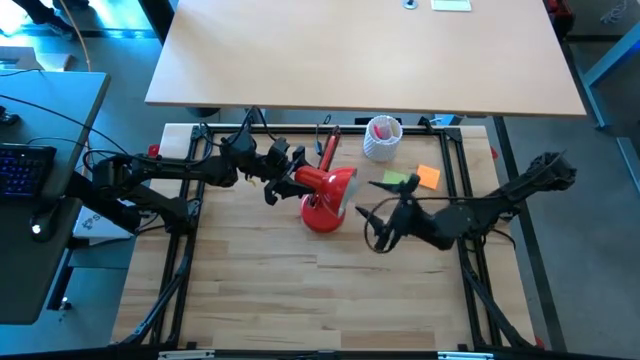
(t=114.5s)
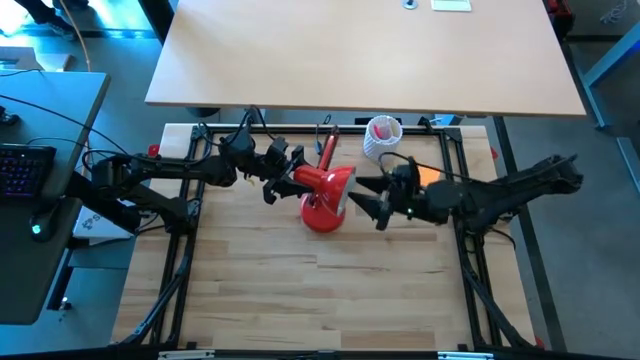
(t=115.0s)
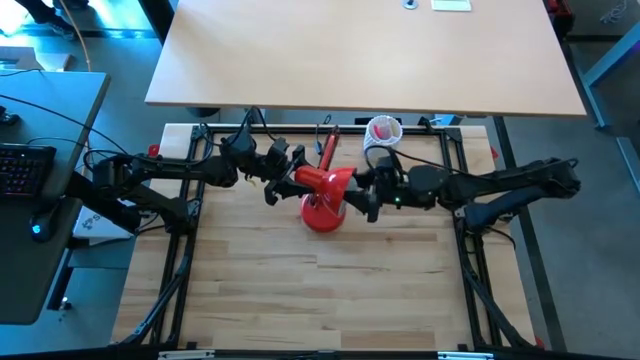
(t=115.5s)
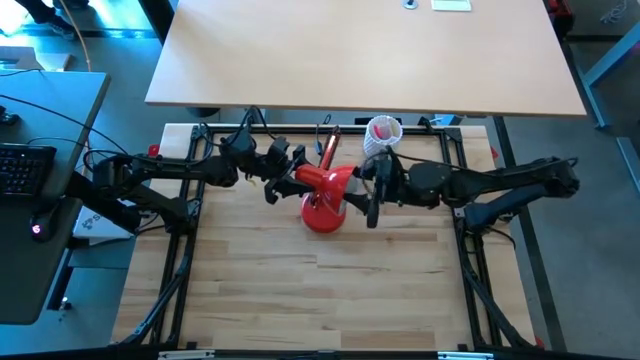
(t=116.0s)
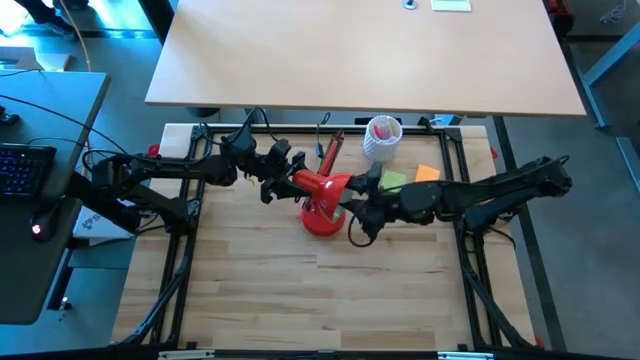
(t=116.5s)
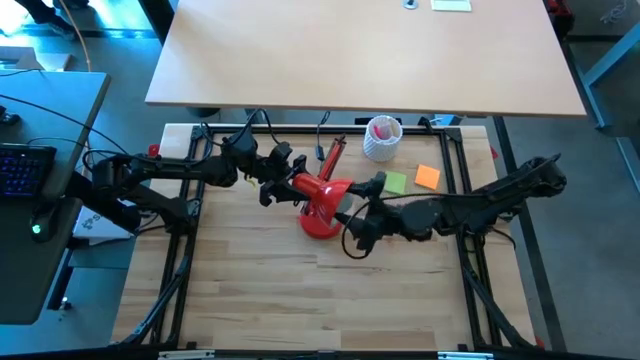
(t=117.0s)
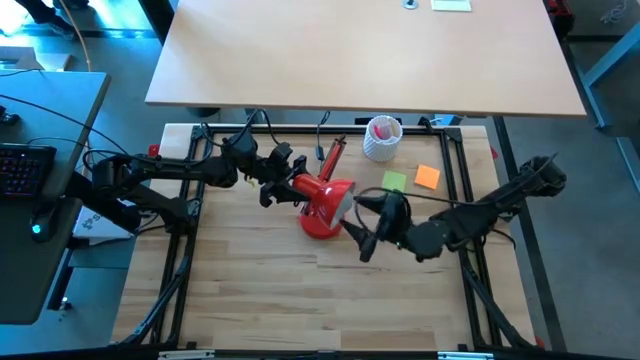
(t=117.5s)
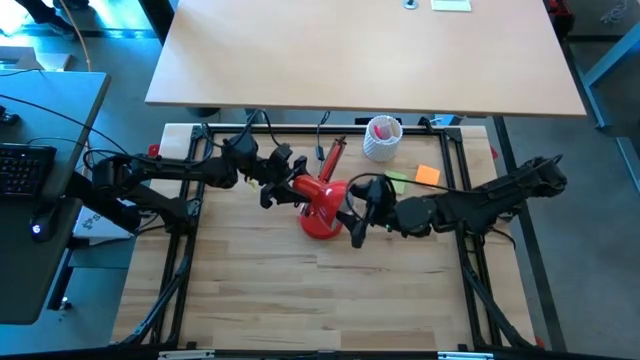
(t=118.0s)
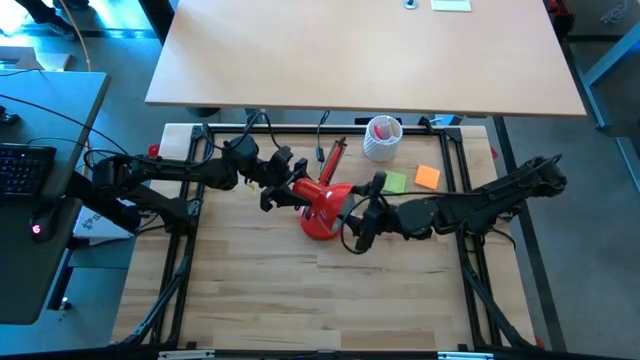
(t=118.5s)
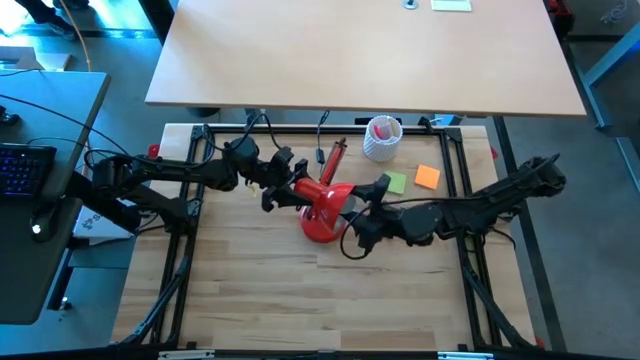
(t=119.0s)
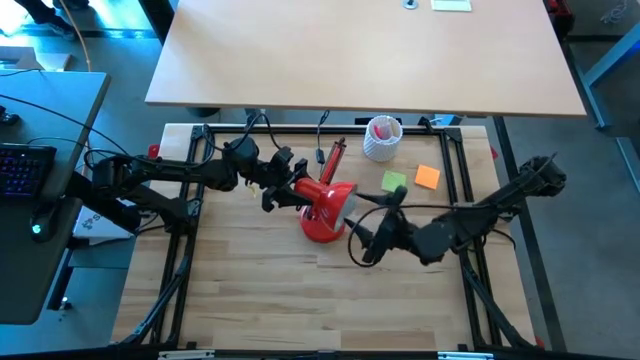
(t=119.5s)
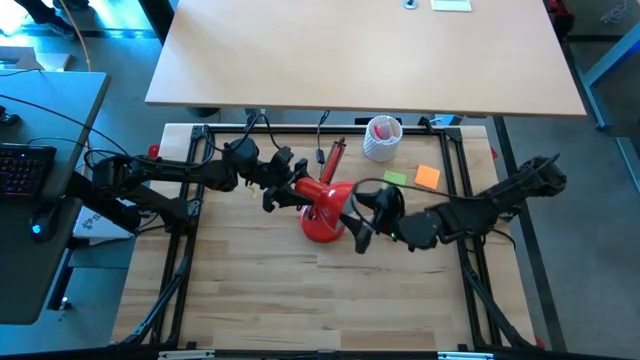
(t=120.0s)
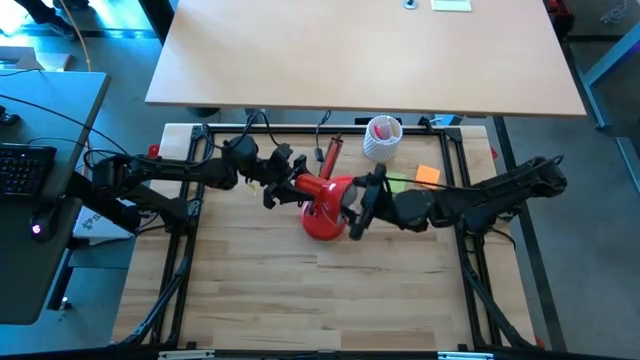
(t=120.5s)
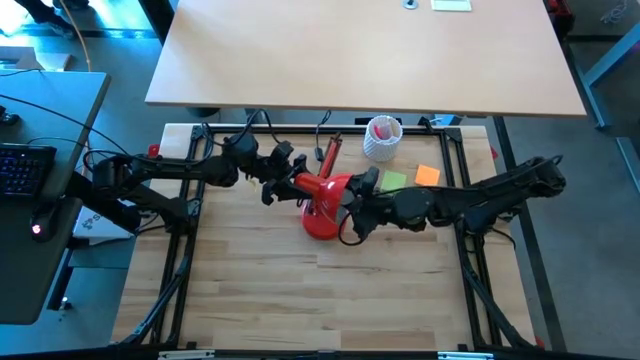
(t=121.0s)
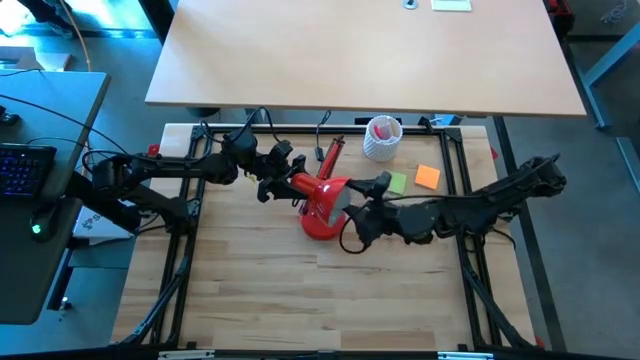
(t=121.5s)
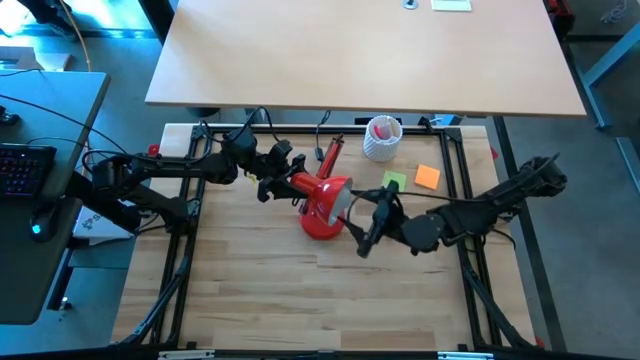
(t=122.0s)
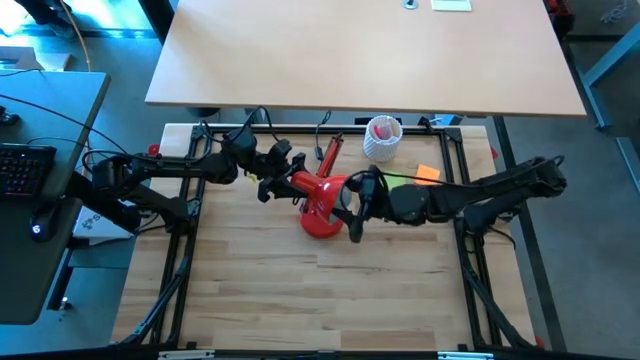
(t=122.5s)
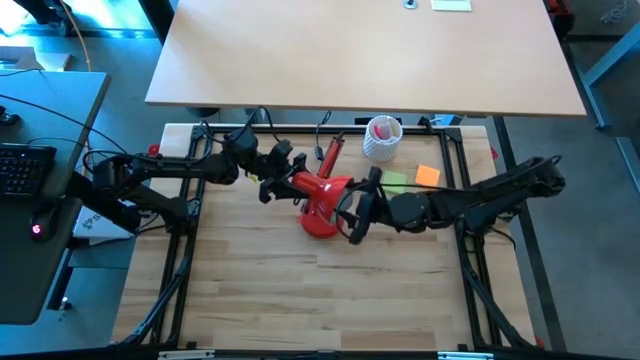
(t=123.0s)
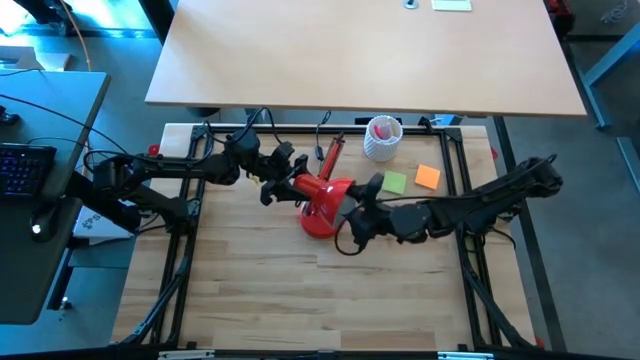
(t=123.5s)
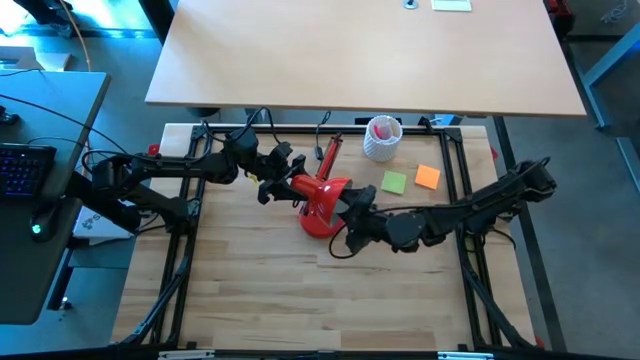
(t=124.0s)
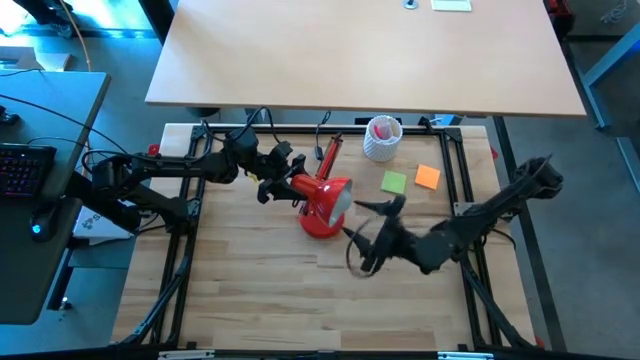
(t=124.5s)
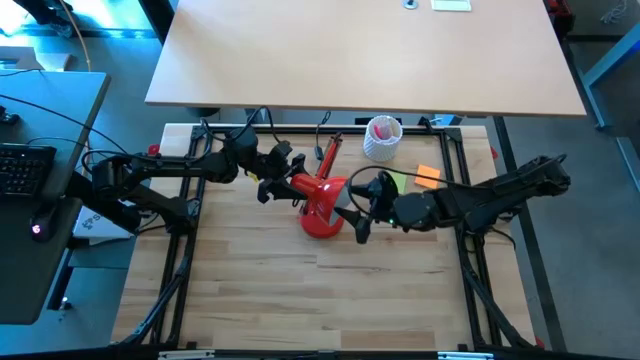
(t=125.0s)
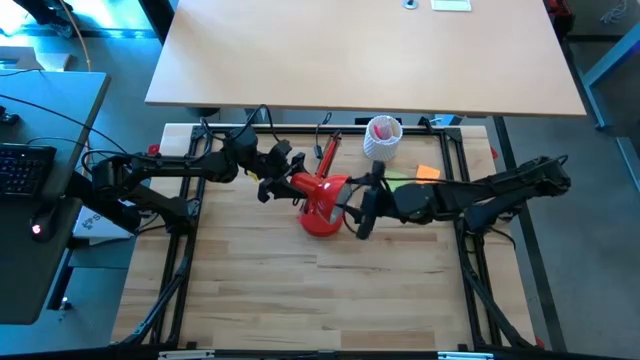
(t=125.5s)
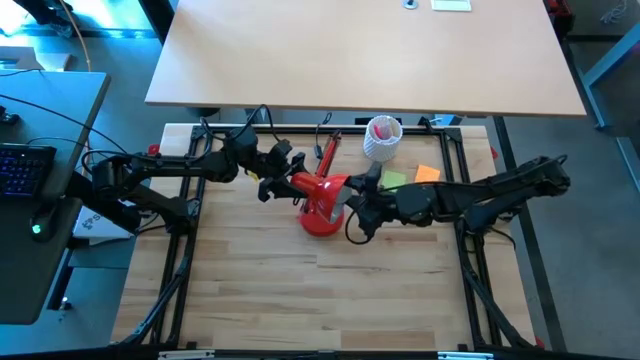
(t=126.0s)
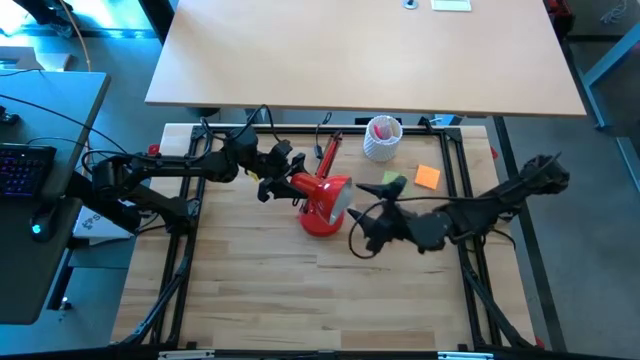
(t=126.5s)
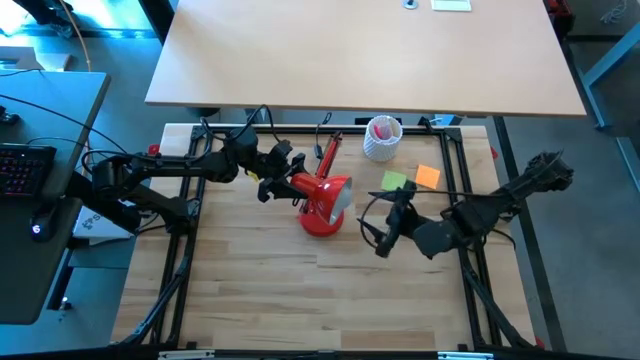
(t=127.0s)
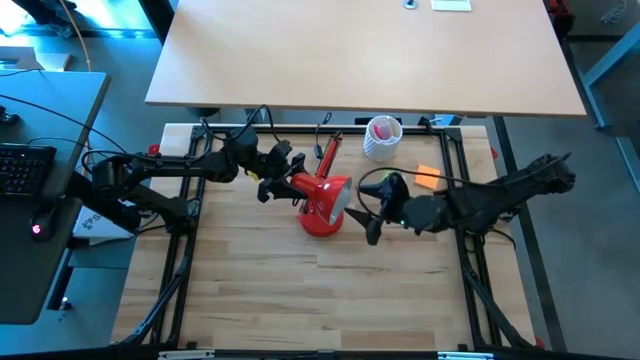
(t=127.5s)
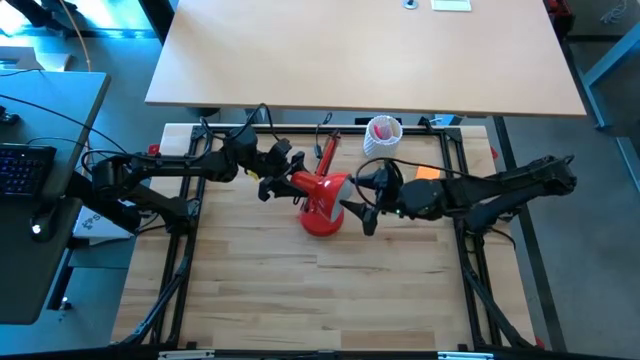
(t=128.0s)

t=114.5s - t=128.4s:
Task: Screw lightbulb
Remove the white lightbulb from the red lamp

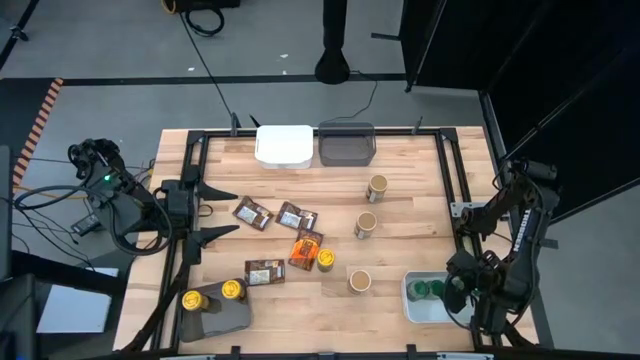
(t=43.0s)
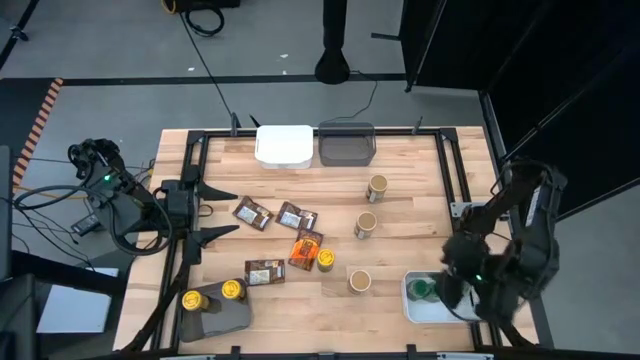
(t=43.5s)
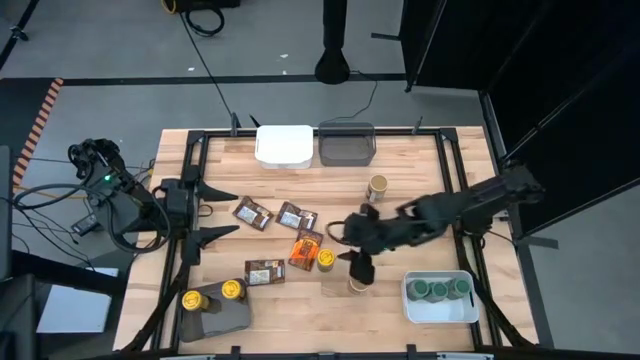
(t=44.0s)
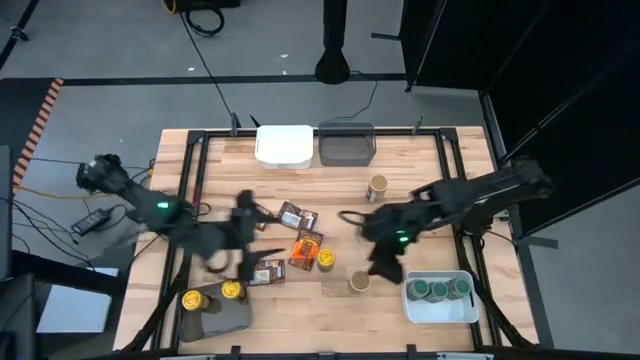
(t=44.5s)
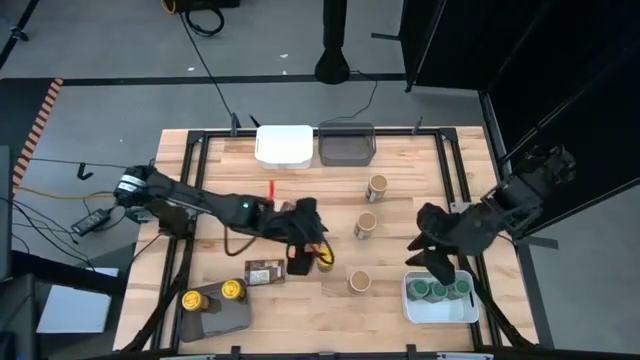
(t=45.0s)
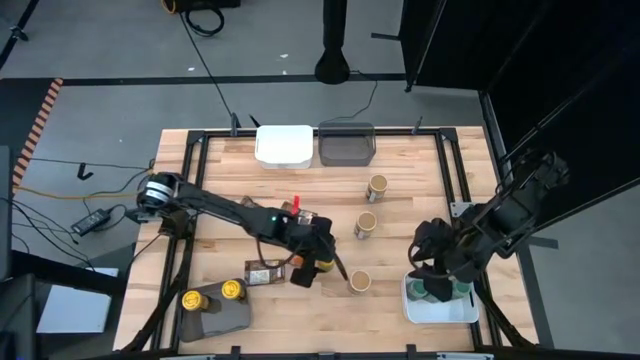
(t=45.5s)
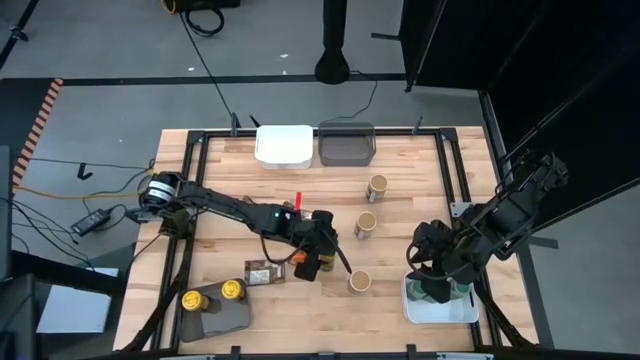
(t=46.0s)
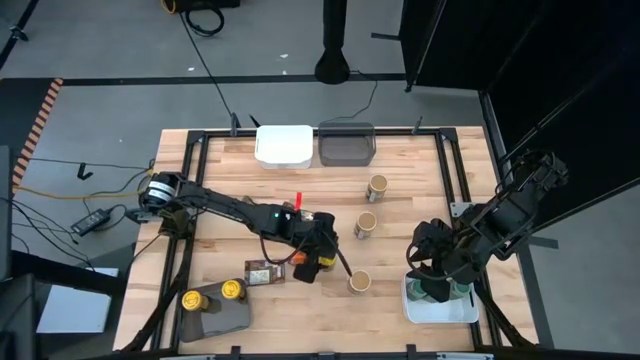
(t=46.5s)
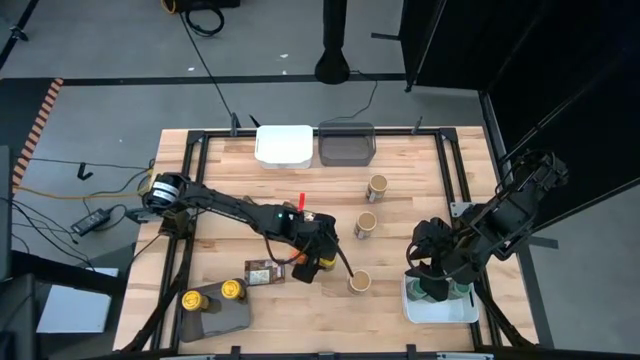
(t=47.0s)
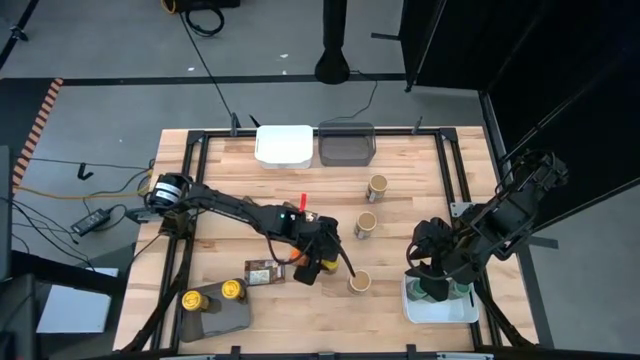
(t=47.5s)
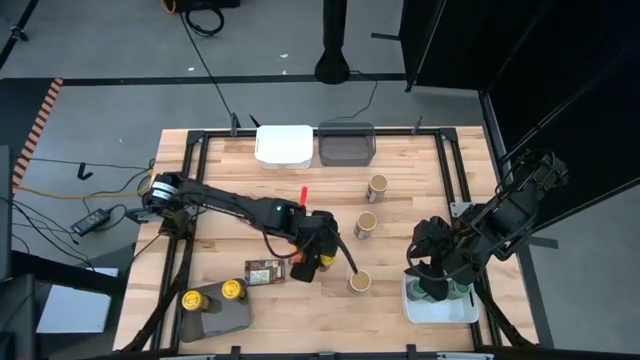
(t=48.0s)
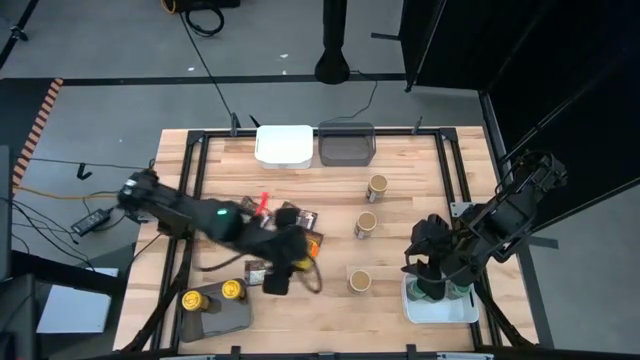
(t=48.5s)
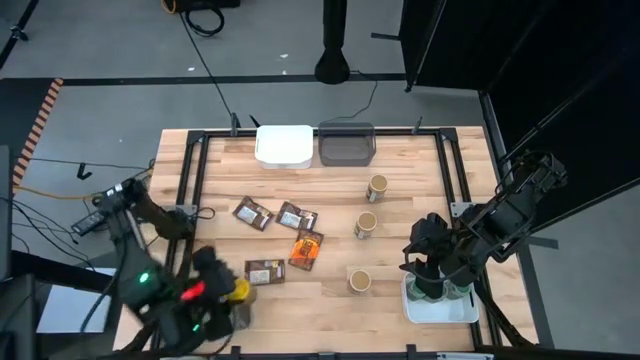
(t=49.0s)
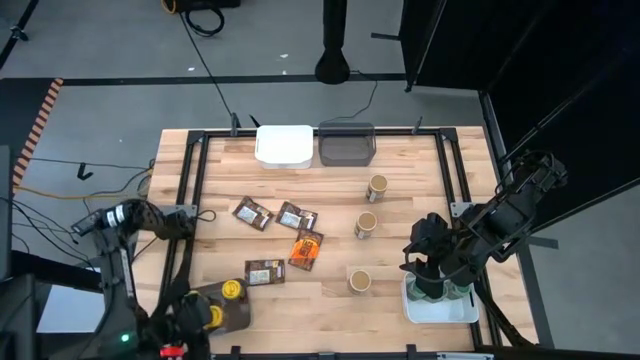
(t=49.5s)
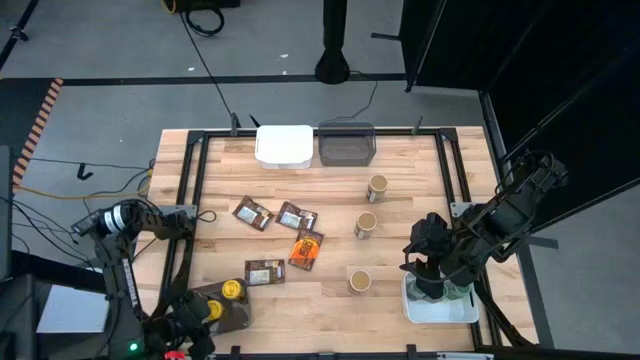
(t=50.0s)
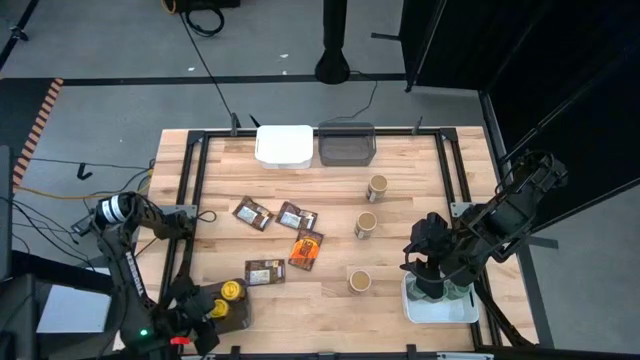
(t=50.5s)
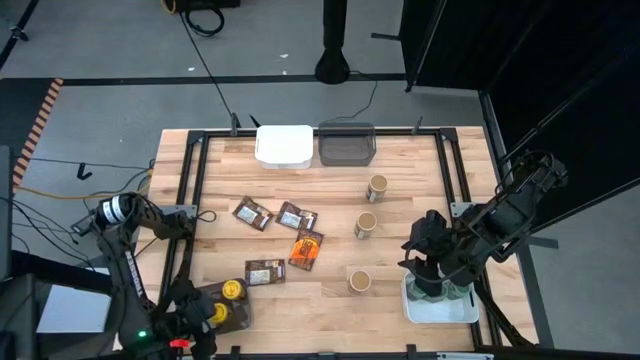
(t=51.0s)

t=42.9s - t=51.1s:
Task: Sort spices by type
Put the yellow seasoning bottle into the bottom black bin
